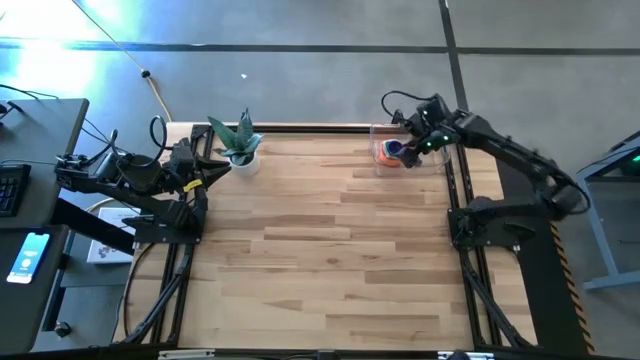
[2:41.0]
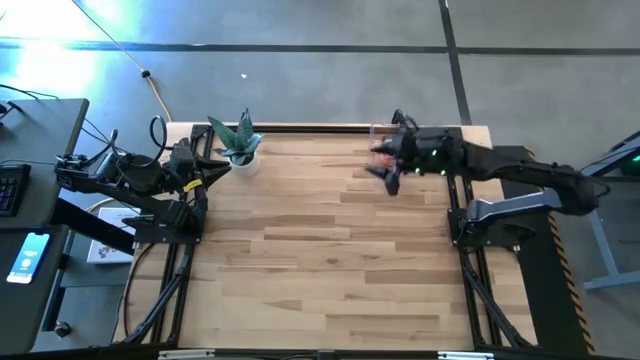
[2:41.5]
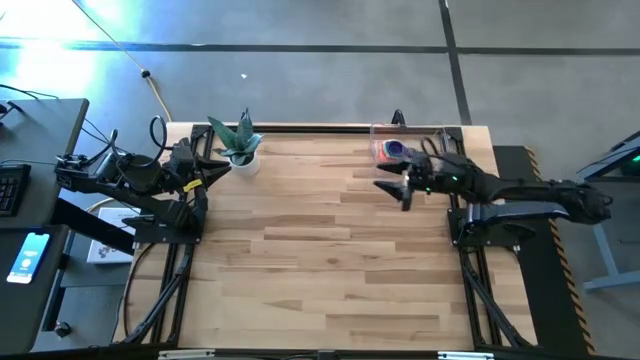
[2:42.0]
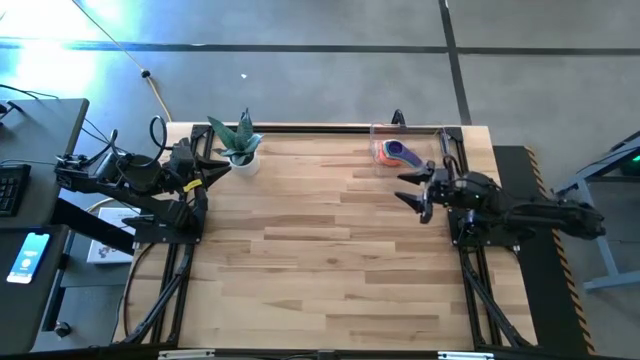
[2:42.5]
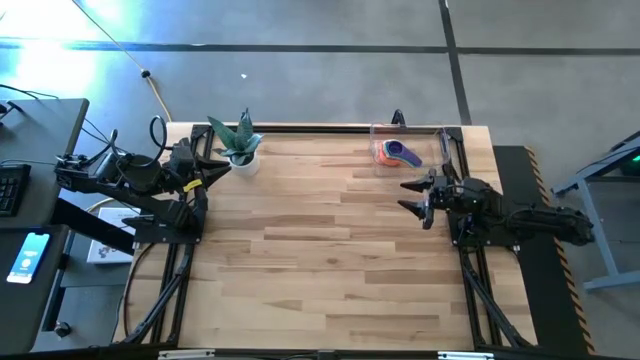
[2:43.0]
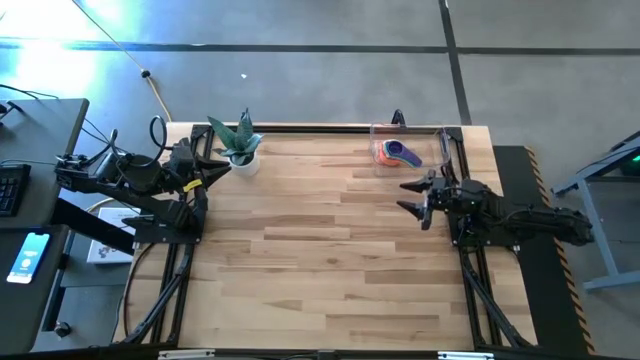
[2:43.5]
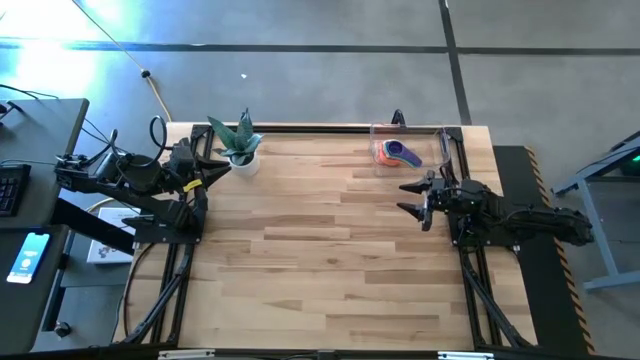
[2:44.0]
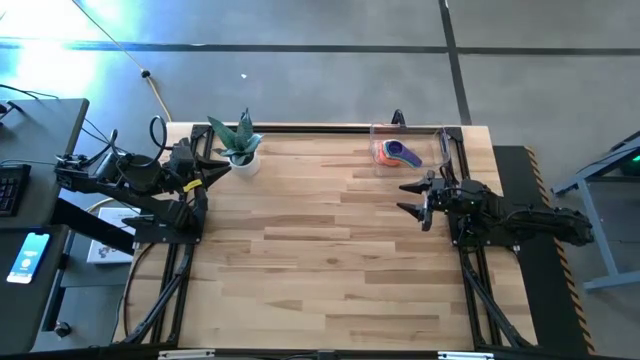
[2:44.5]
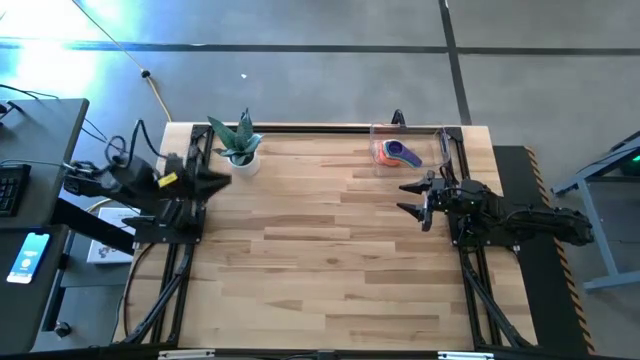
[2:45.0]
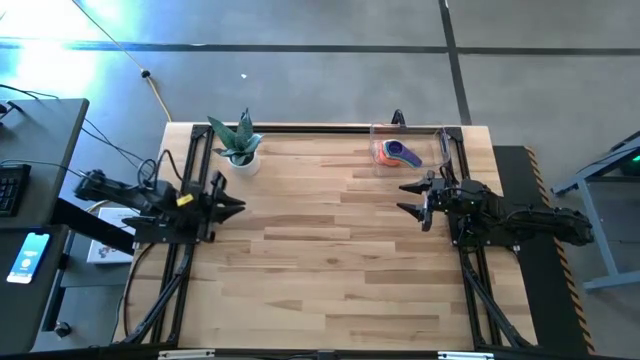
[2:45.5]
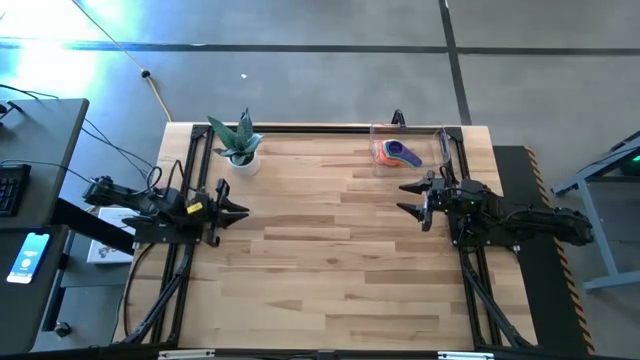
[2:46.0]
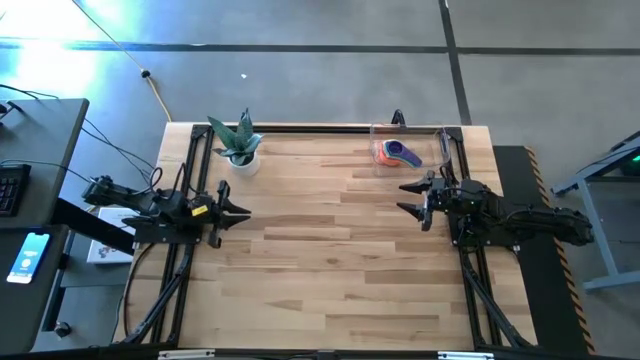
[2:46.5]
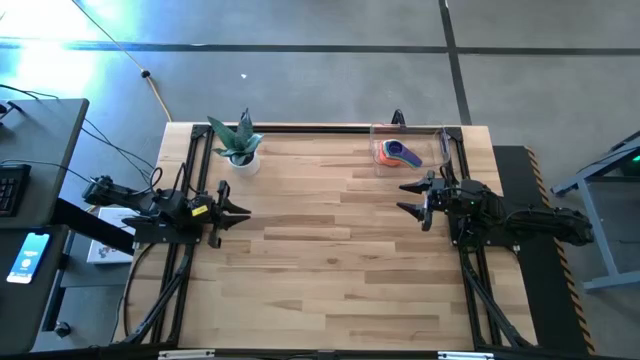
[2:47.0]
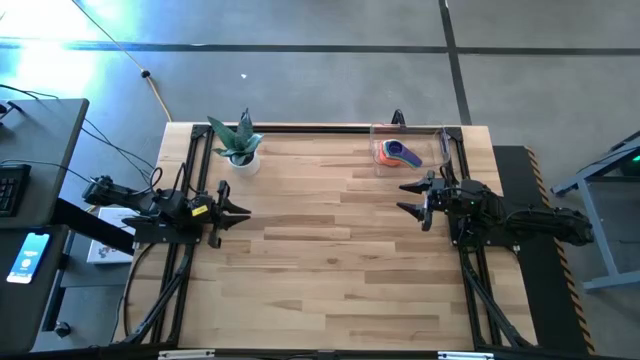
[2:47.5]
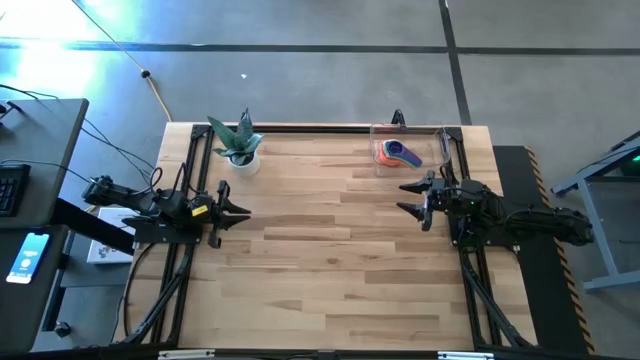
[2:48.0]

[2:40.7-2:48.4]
Task: Nest measuring cups in basket
Return to Home Position
